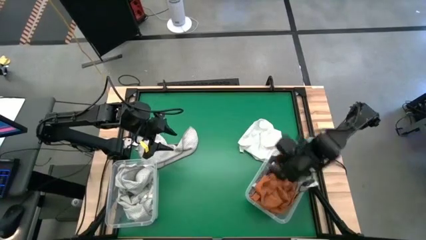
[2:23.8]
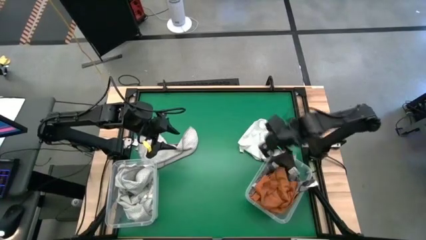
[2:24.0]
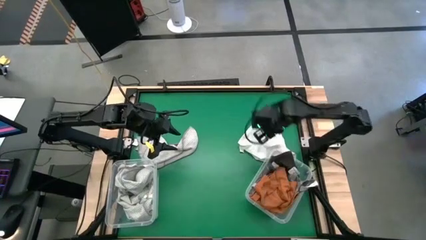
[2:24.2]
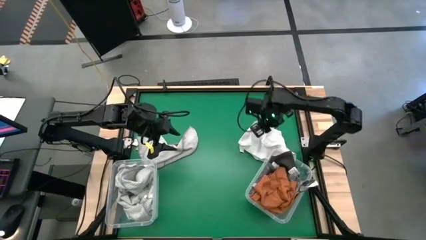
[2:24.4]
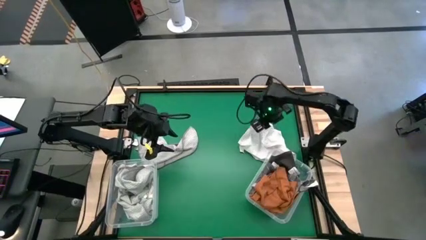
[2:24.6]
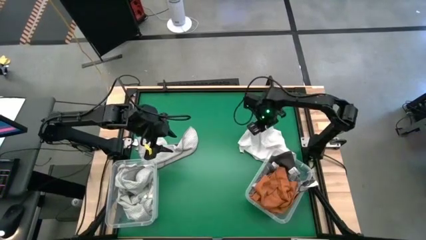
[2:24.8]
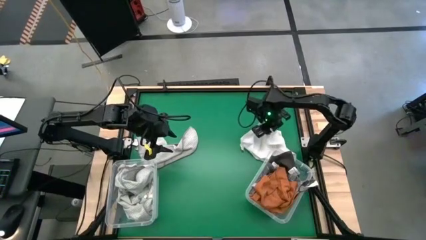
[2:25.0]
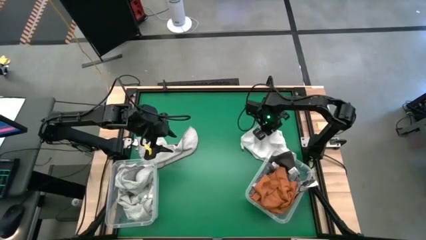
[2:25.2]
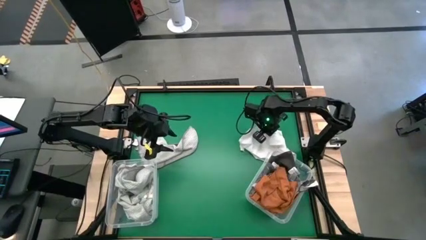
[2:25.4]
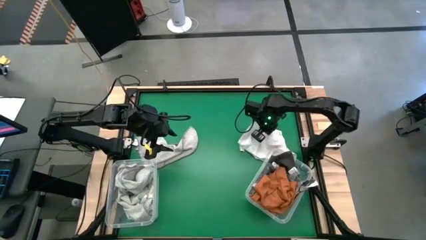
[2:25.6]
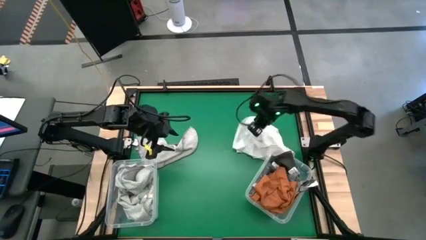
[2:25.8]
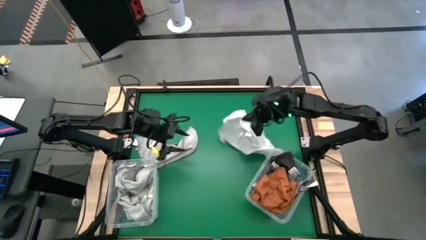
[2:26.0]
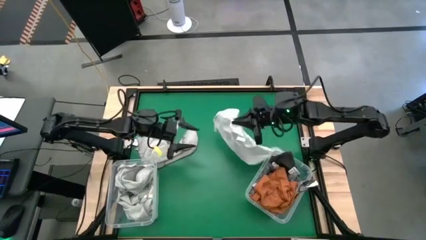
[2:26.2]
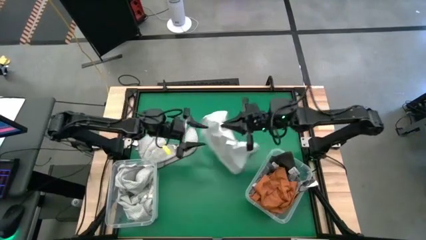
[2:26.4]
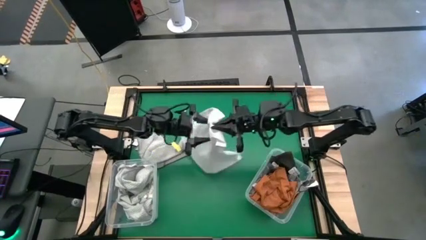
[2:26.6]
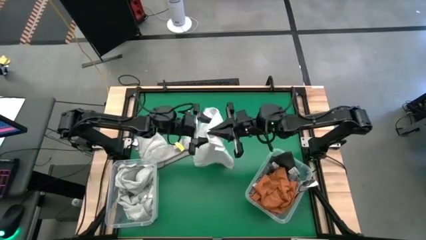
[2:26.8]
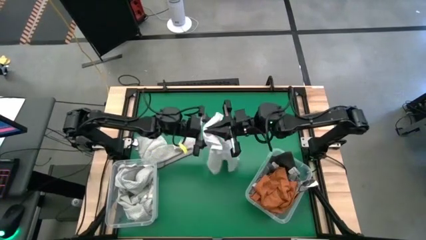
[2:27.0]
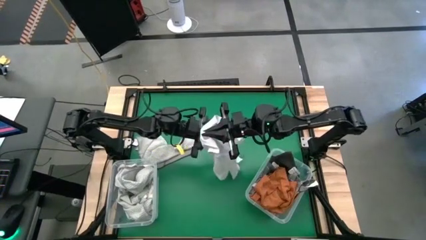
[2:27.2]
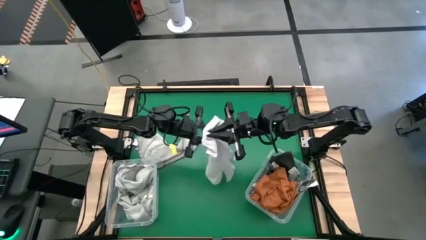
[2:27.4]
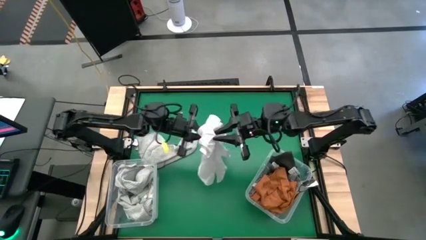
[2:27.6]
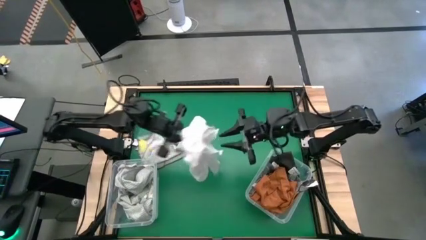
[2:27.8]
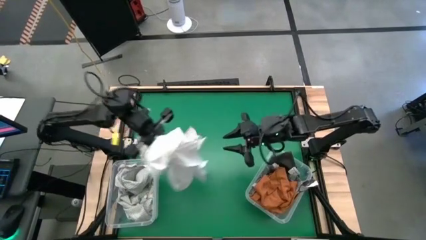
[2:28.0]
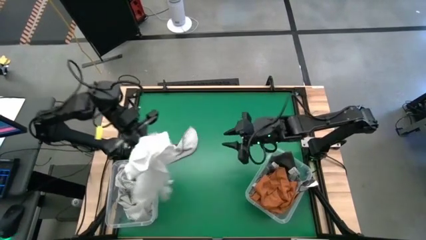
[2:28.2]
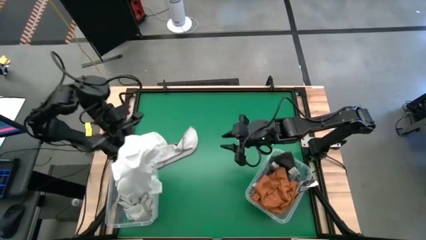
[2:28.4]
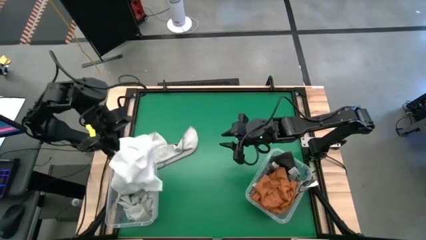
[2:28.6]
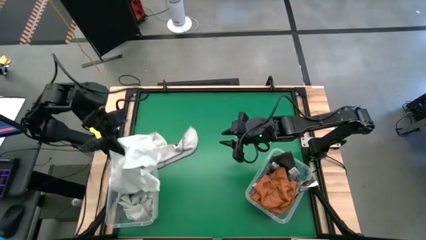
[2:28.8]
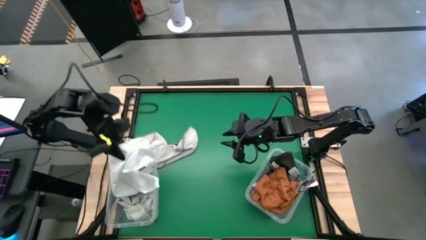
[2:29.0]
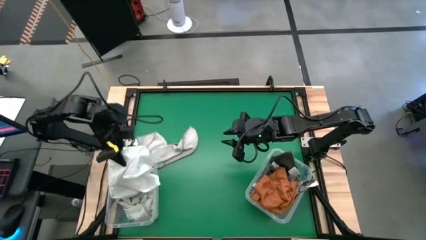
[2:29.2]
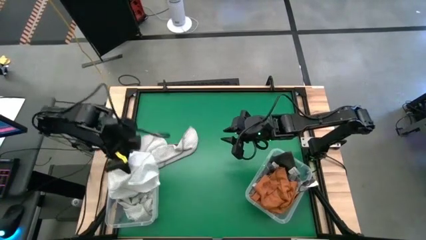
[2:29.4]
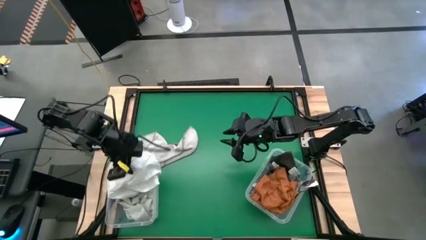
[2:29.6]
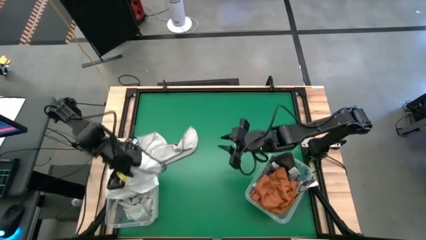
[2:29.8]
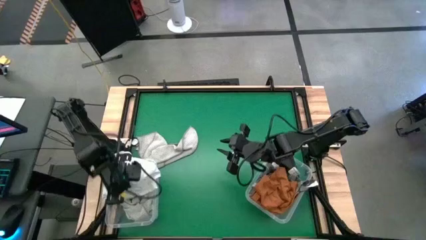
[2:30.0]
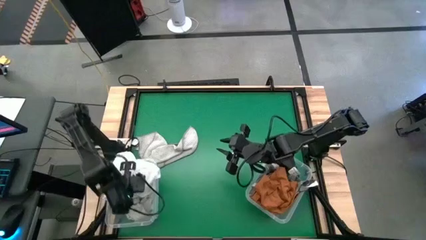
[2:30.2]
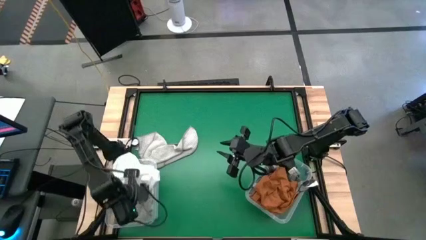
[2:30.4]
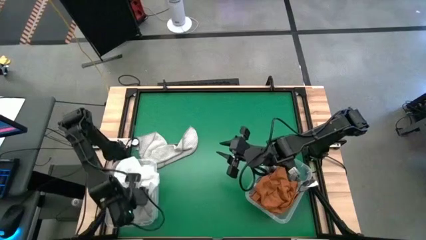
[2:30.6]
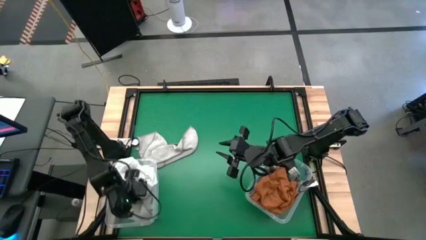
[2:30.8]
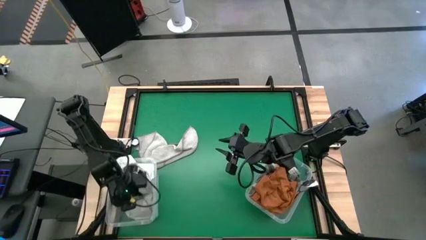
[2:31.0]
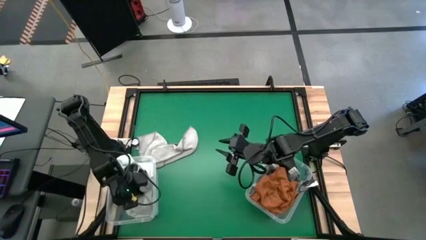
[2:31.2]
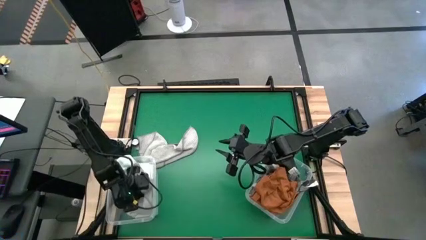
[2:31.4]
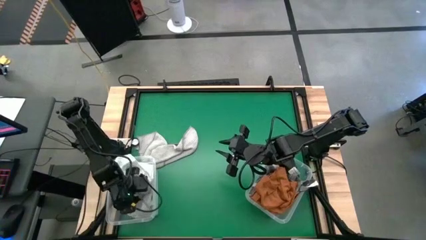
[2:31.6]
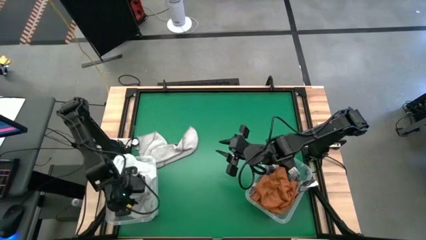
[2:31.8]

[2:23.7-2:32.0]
Task: Sort towels by color in basket
Put the white towel into the left transparent bin

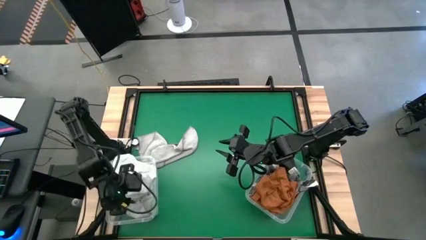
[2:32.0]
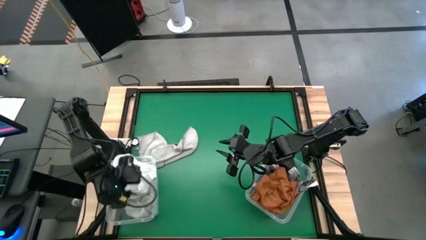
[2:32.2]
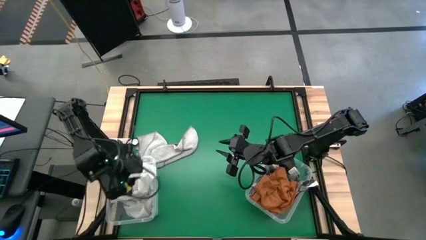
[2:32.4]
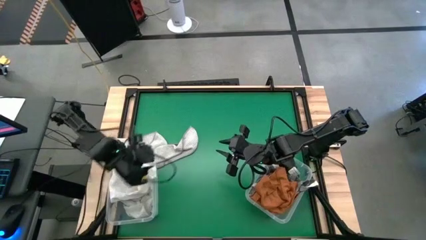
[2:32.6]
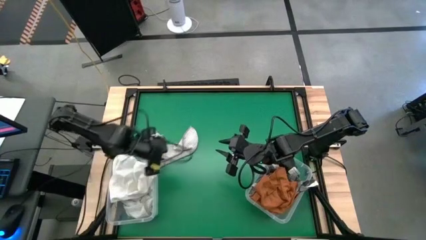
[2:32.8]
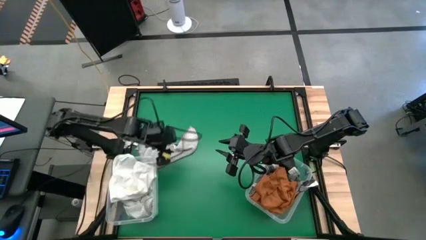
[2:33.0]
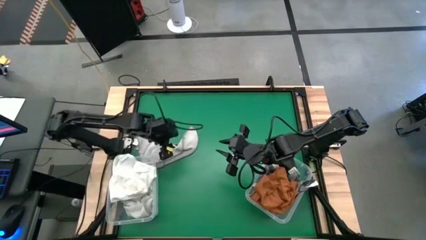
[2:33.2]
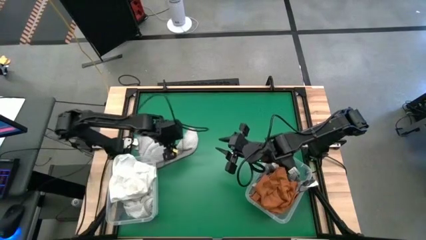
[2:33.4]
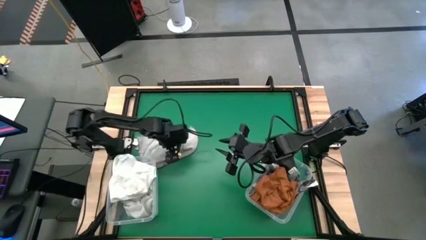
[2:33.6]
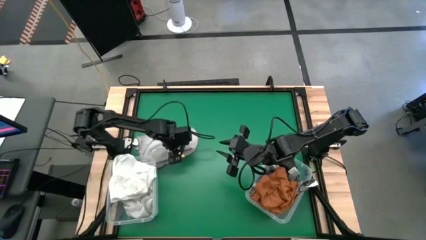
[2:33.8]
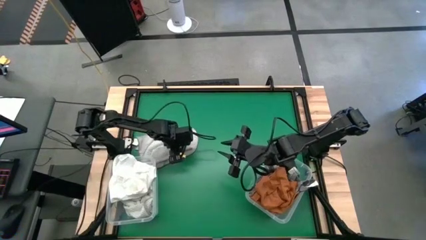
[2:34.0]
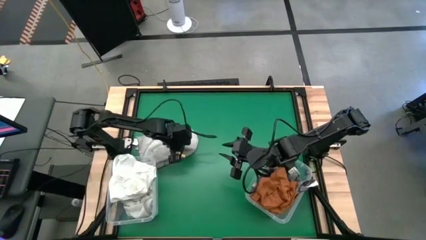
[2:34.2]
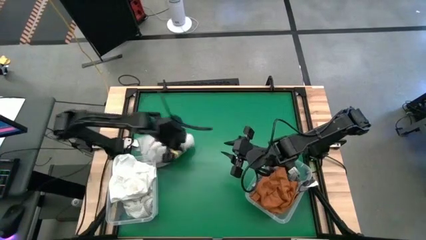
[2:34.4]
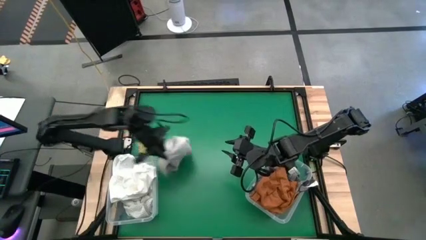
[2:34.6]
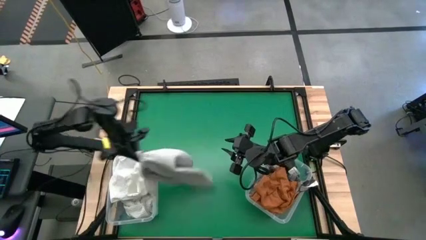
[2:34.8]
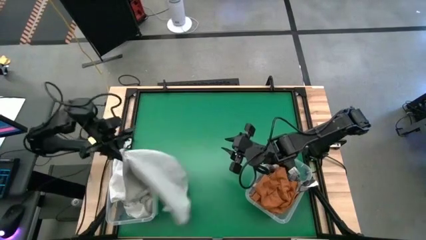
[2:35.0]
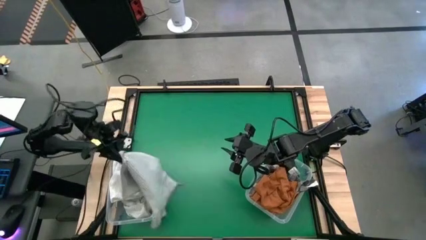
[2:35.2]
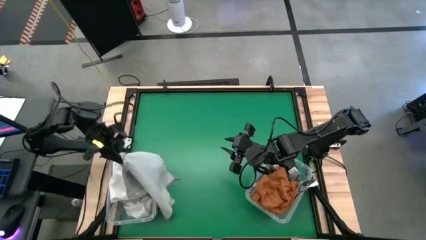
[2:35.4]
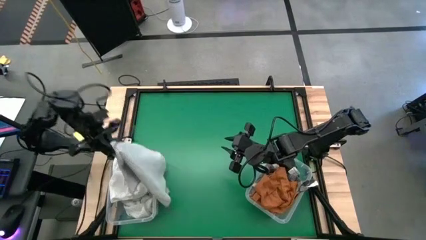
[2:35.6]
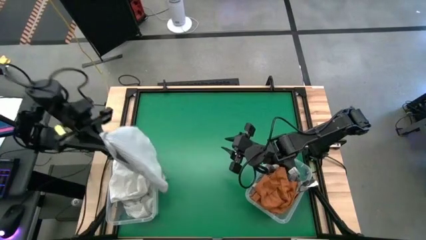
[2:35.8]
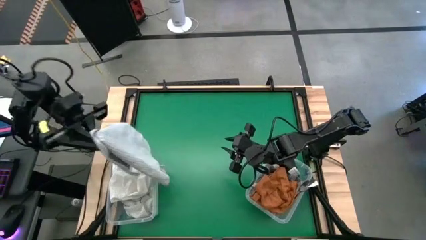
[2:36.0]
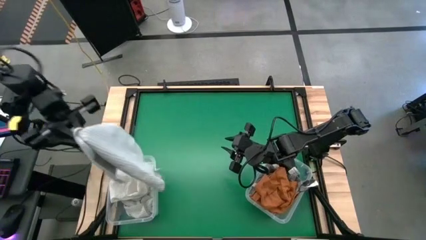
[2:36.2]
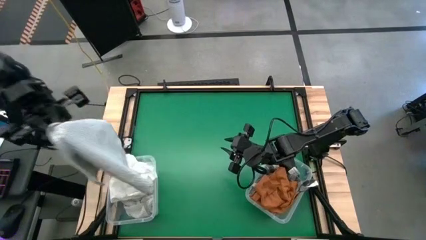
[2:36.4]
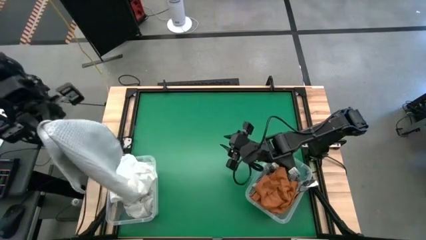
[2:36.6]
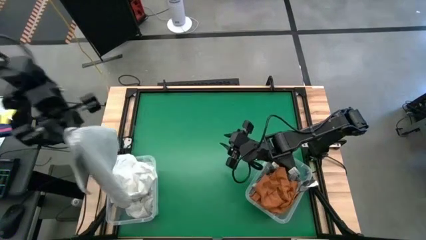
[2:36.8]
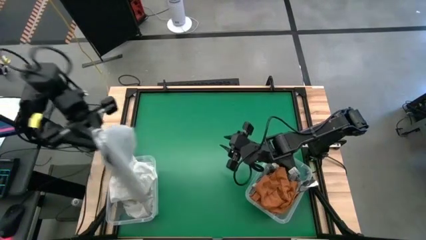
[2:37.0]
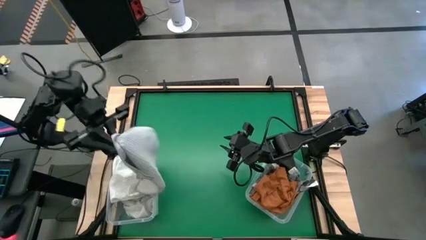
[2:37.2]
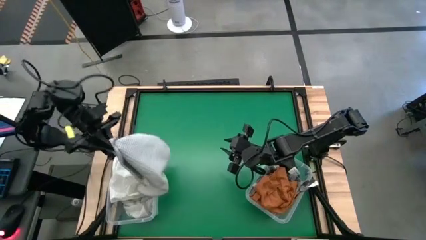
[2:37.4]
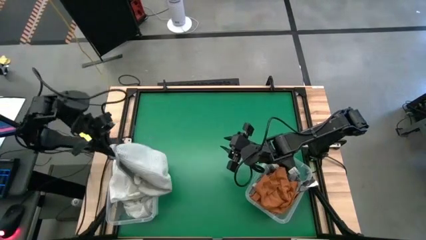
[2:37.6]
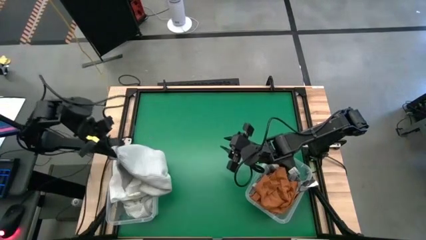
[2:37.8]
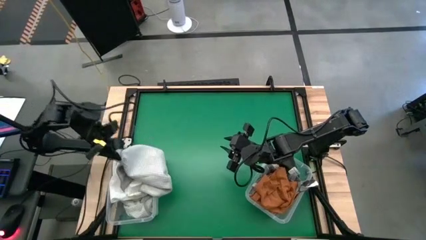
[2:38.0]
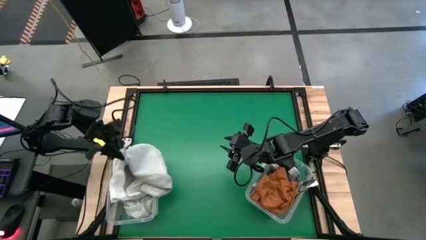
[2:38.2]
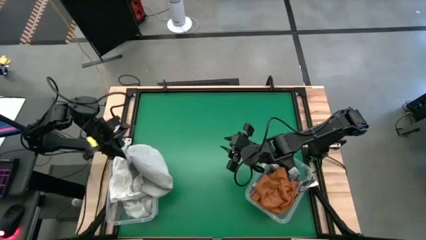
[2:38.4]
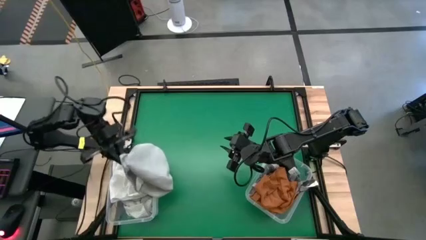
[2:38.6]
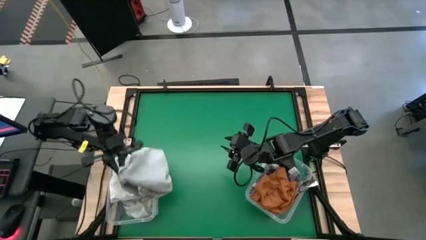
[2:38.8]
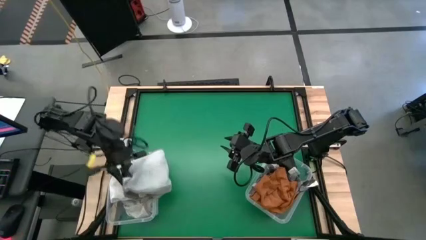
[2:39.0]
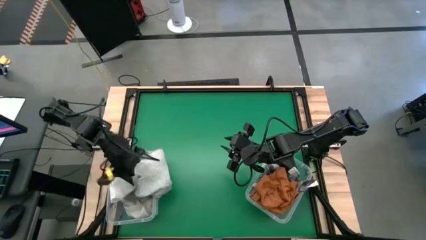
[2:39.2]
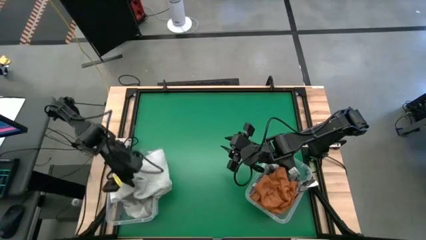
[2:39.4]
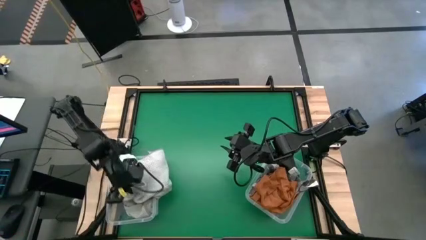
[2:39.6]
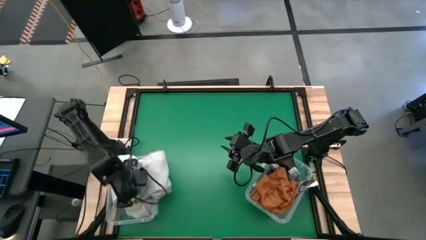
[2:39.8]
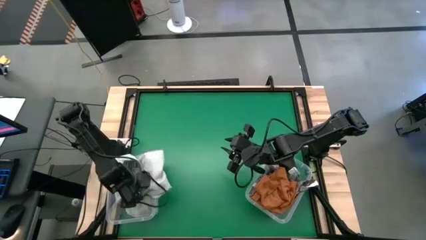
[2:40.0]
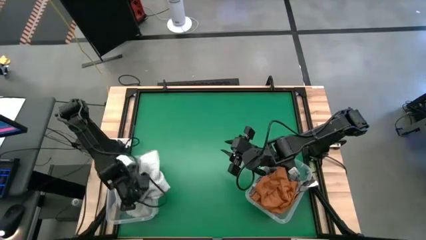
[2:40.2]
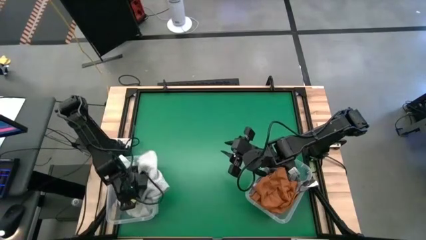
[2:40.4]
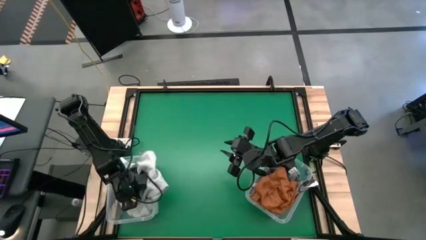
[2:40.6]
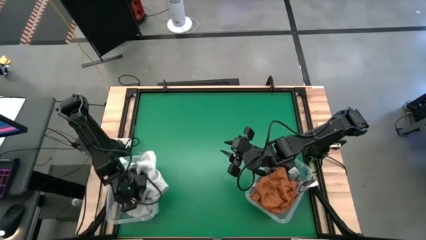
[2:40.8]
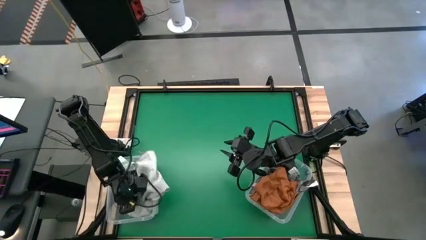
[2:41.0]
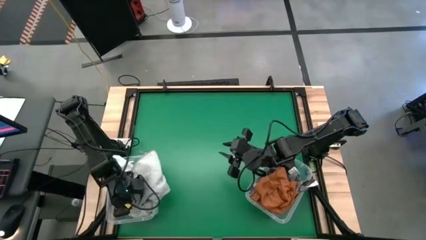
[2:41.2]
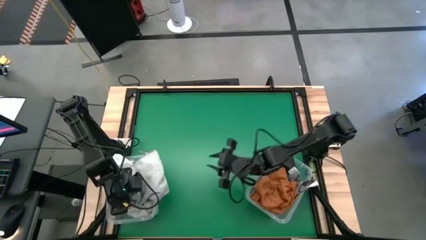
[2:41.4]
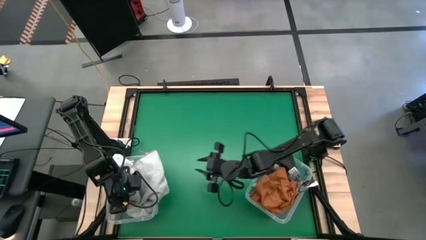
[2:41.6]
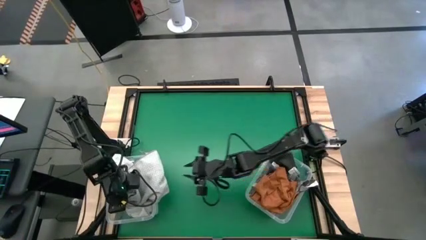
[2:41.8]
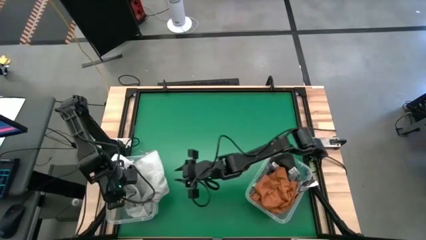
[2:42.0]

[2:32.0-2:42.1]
Put the gray towel into the left transparent bin
